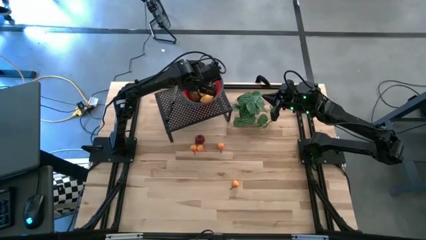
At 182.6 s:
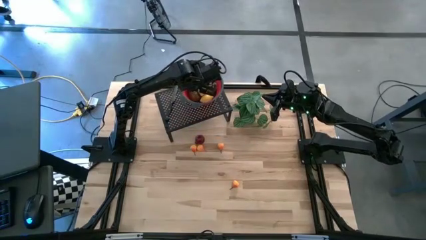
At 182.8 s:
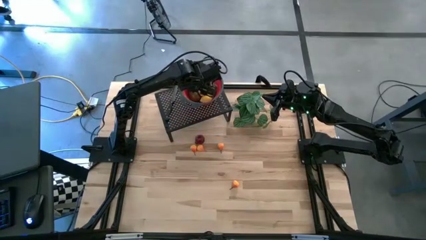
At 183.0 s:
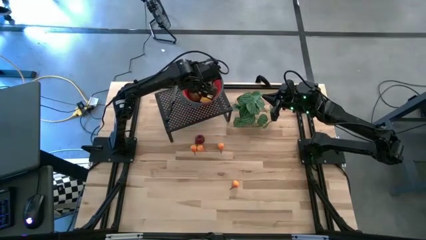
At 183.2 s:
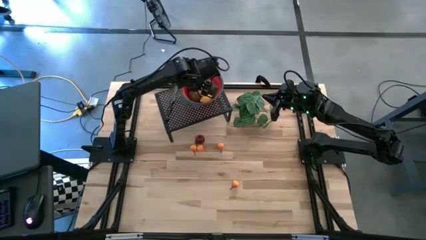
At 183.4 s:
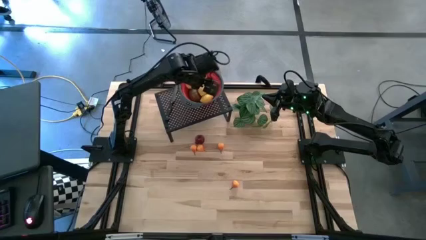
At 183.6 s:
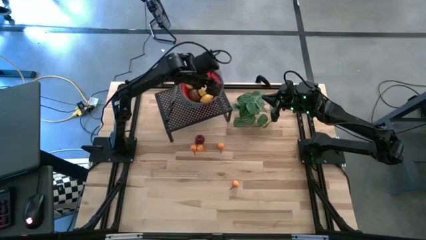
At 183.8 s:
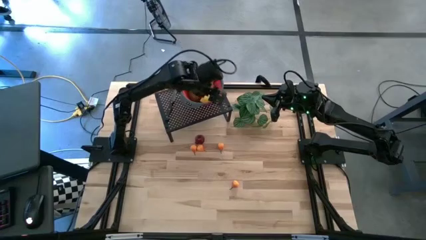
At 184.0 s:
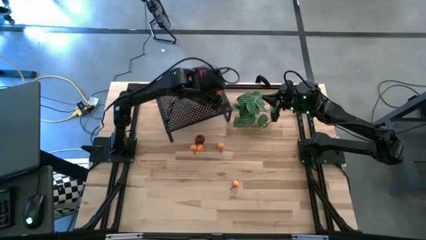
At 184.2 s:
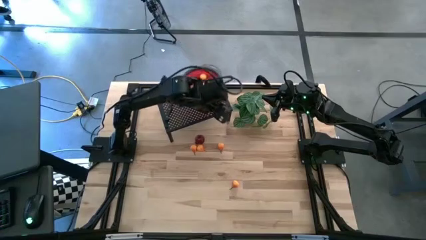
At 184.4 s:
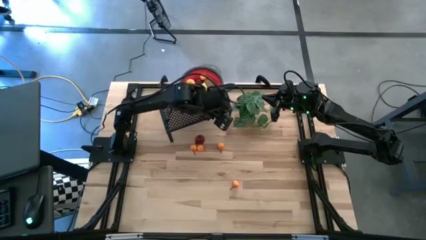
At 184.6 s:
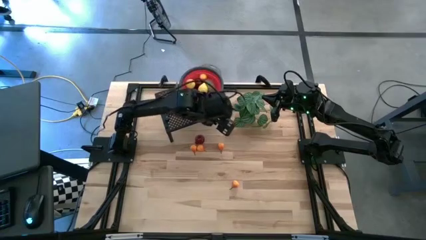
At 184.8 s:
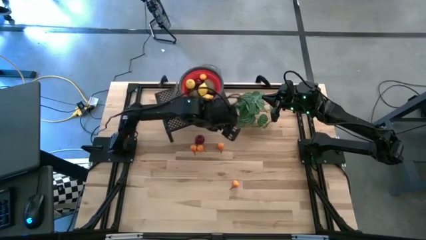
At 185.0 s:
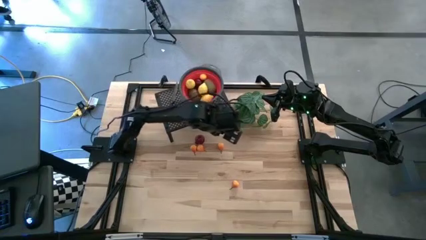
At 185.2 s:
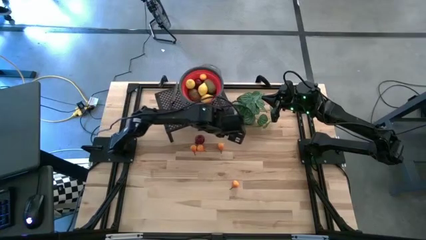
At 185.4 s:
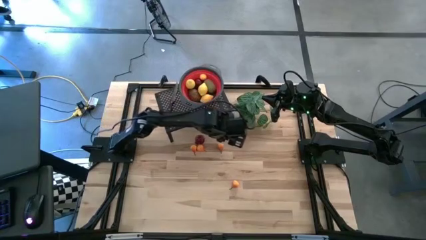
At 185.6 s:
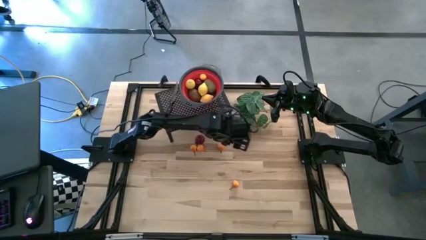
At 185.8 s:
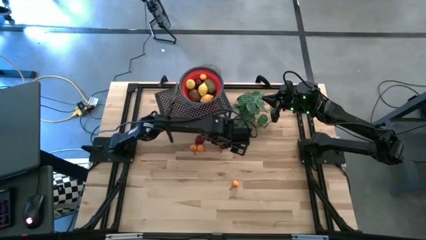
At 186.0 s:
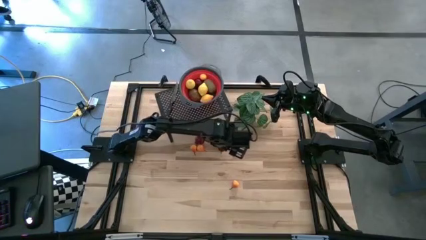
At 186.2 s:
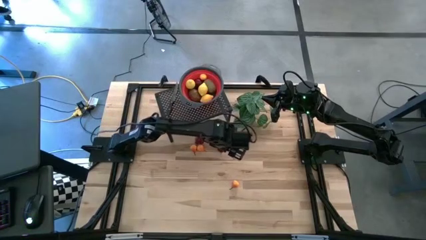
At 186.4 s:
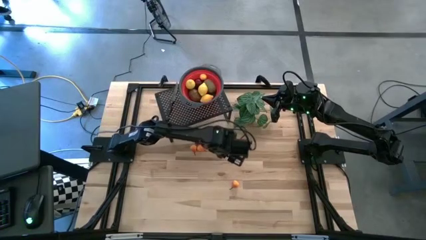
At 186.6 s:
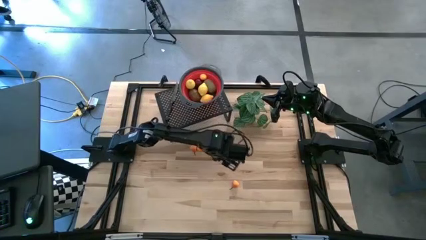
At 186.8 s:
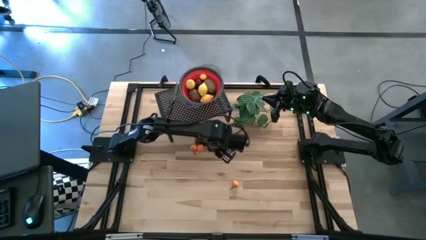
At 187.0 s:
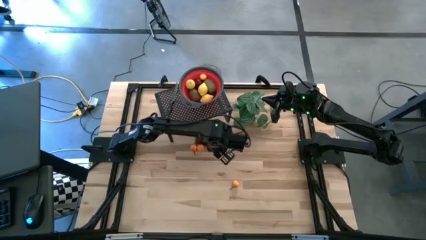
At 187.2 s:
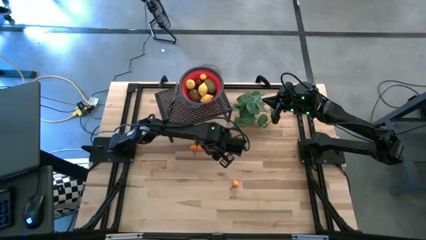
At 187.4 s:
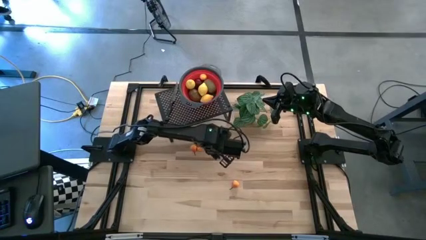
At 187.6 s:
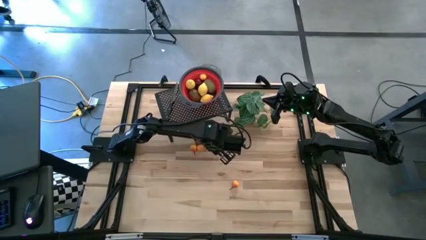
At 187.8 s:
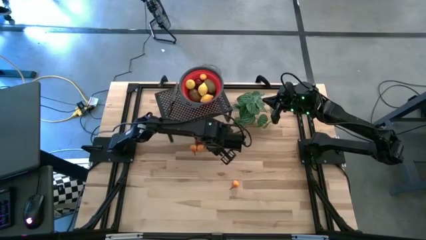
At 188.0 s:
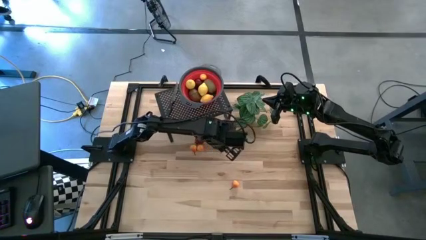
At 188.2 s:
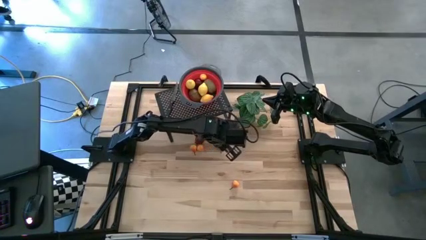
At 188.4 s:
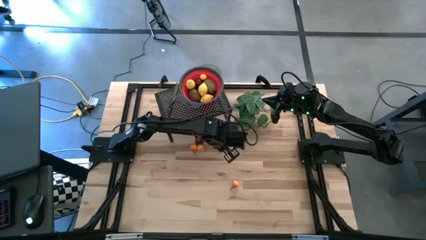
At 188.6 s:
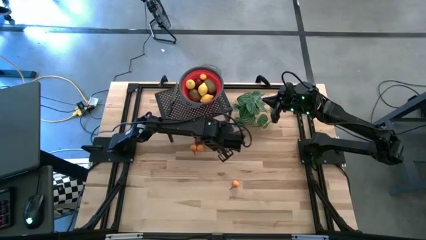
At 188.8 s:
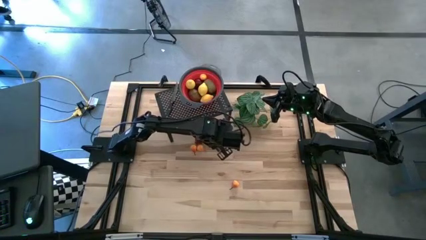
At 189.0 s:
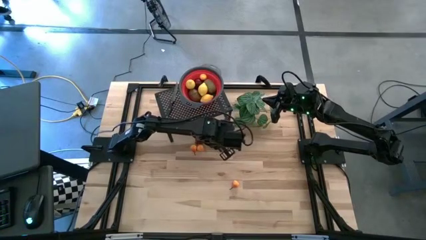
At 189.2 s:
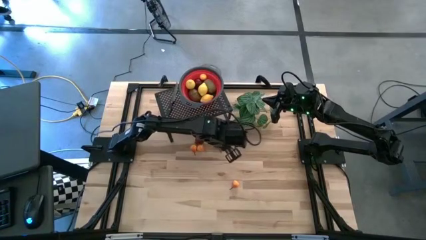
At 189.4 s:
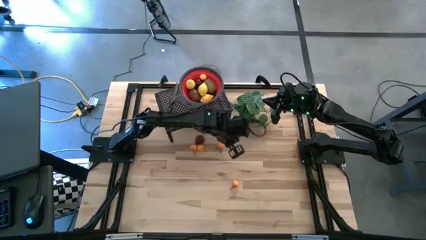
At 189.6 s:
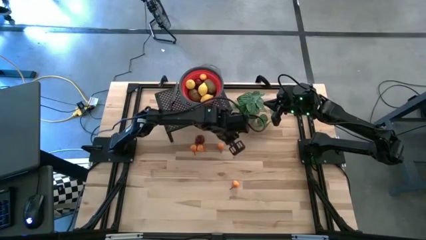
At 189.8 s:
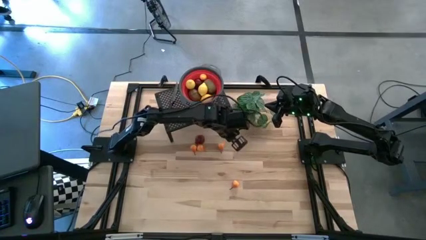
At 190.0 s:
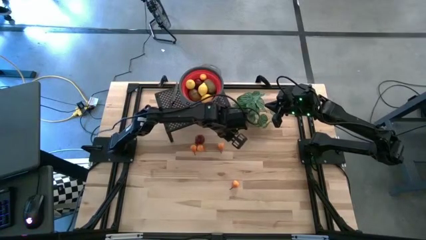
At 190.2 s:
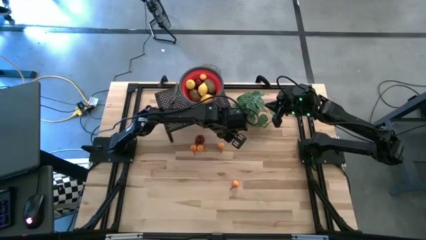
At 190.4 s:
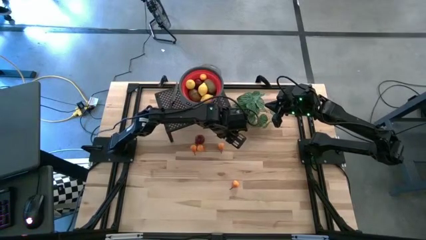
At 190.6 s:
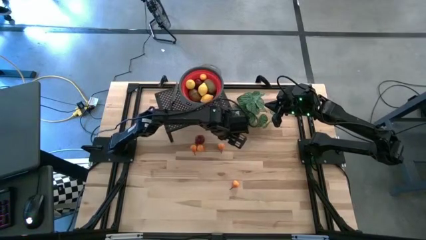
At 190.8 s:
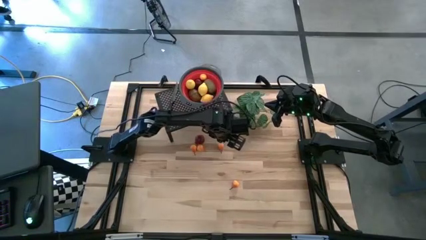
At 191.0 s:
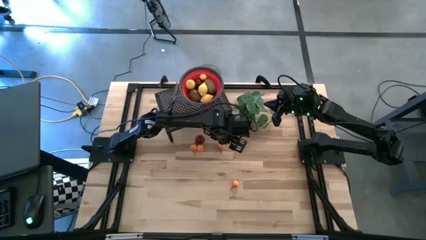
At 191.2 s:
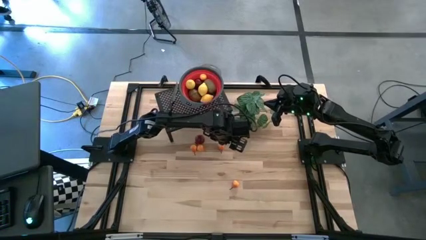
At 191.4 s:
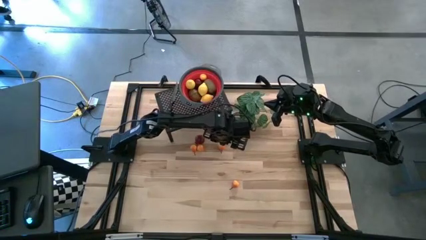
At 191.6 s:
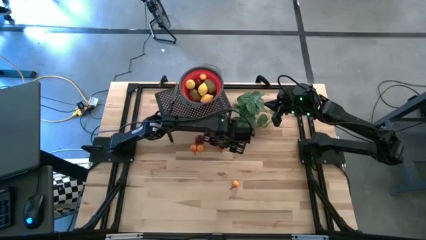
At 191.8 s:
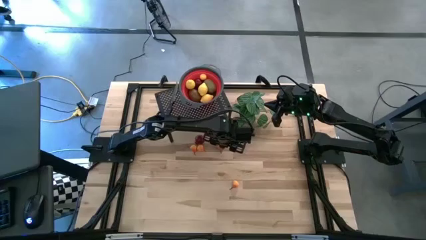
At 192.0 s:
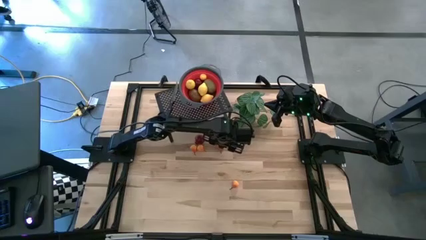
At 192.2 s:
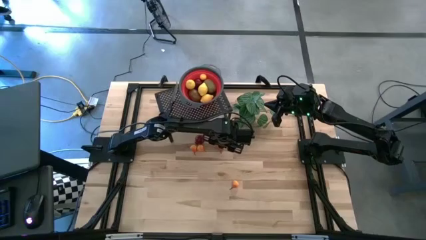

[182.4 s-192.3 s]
Task: Pick & Place Fruit
Put the orange pear into the red basket on the shelf
